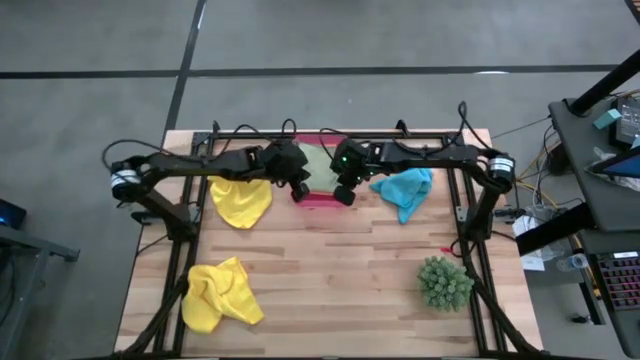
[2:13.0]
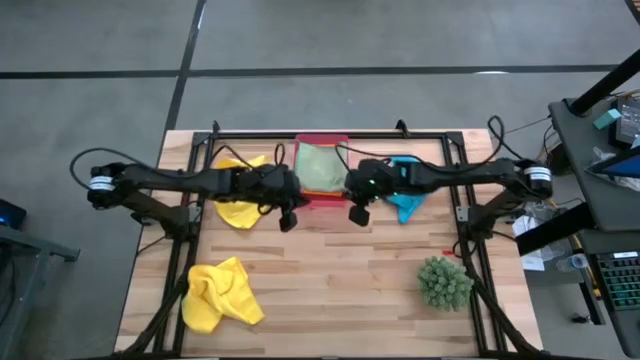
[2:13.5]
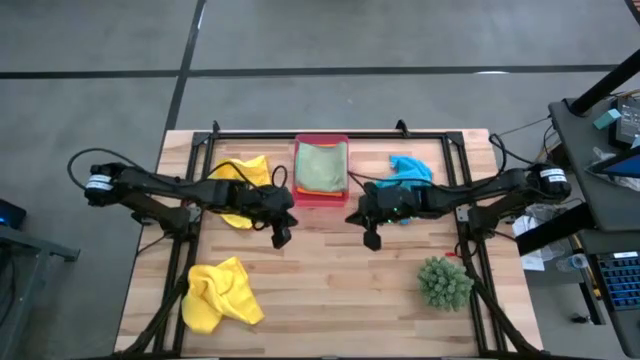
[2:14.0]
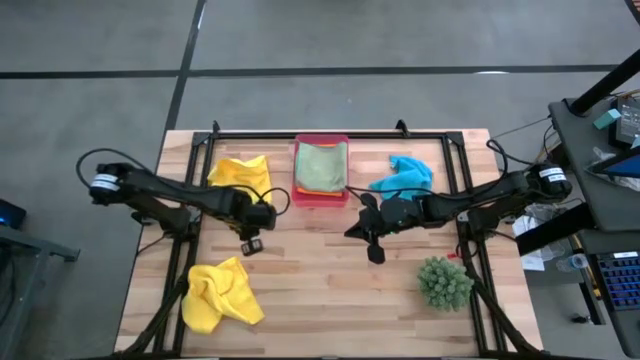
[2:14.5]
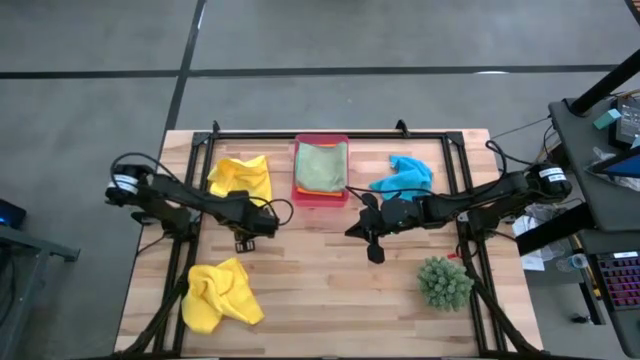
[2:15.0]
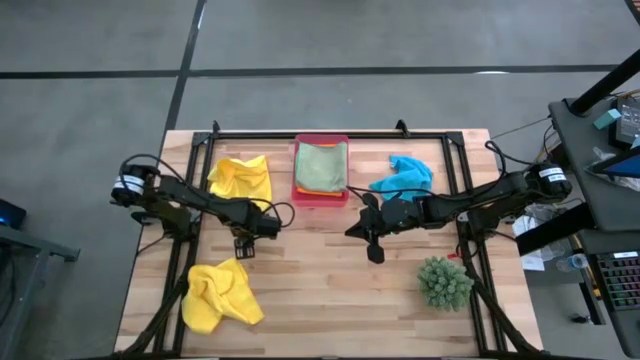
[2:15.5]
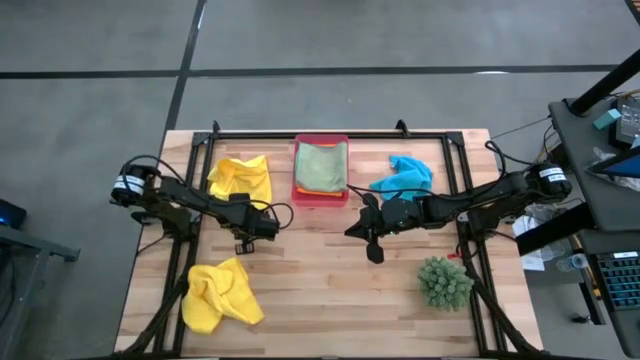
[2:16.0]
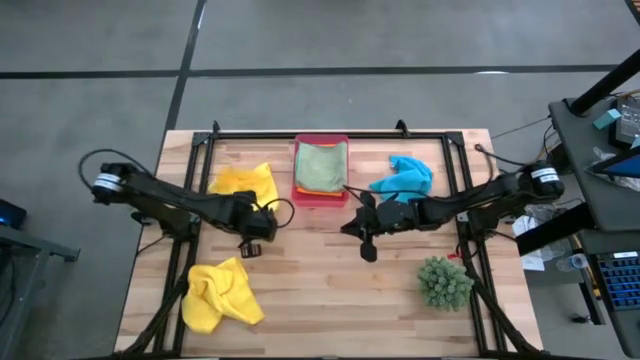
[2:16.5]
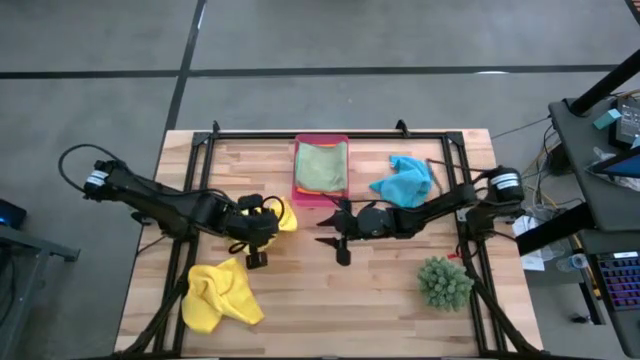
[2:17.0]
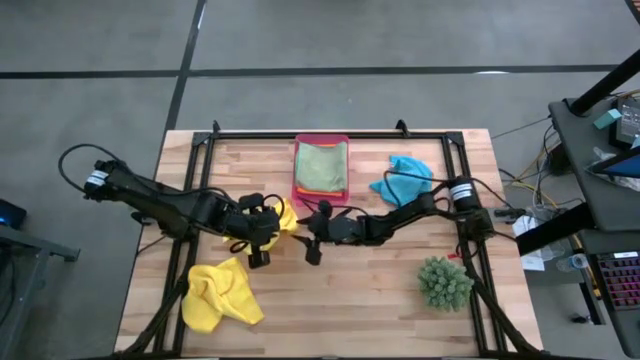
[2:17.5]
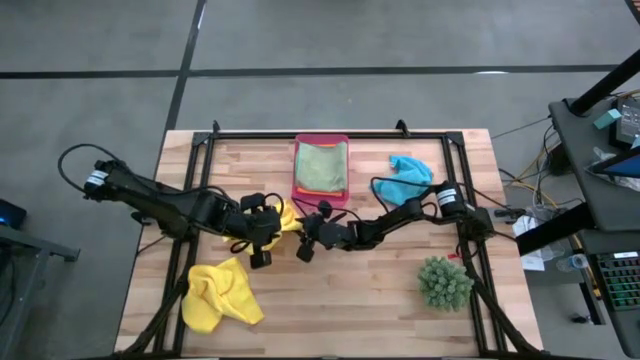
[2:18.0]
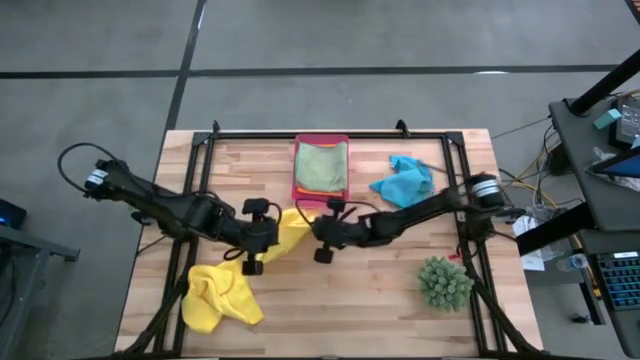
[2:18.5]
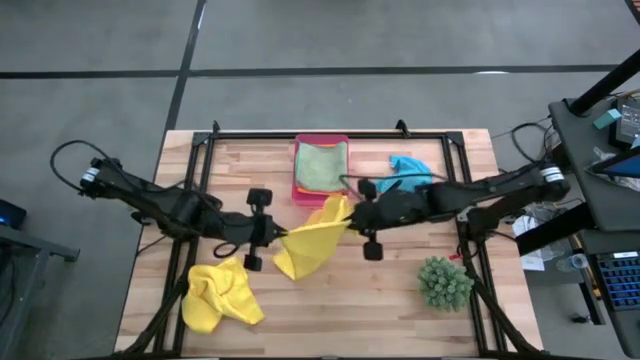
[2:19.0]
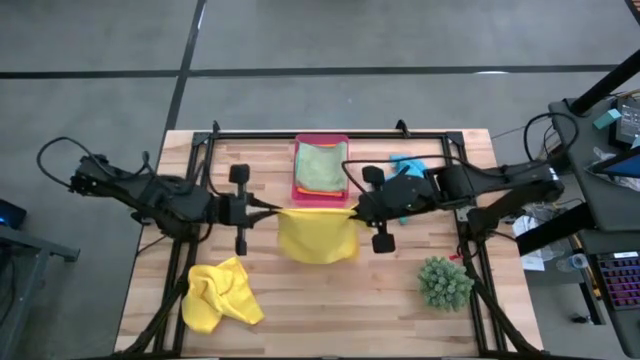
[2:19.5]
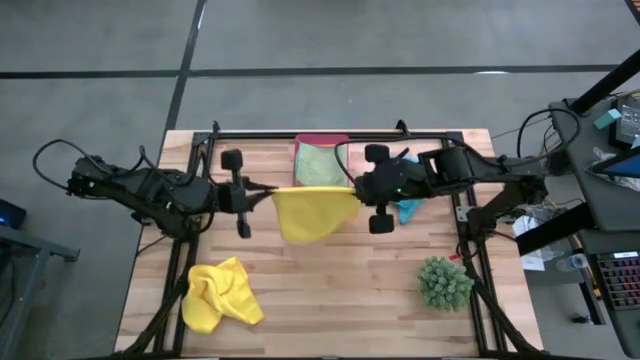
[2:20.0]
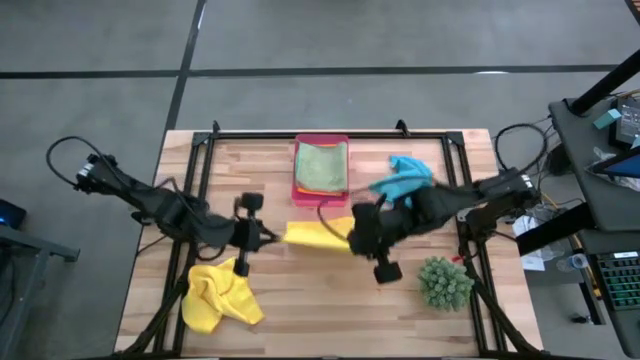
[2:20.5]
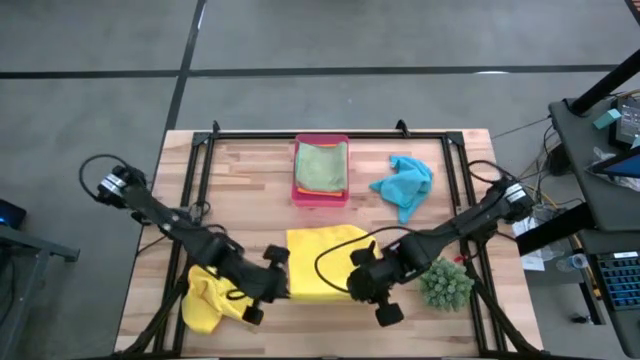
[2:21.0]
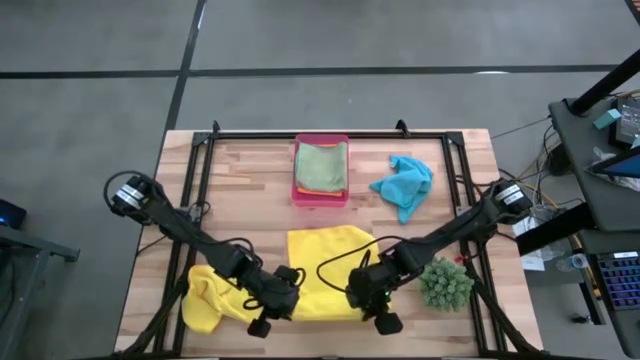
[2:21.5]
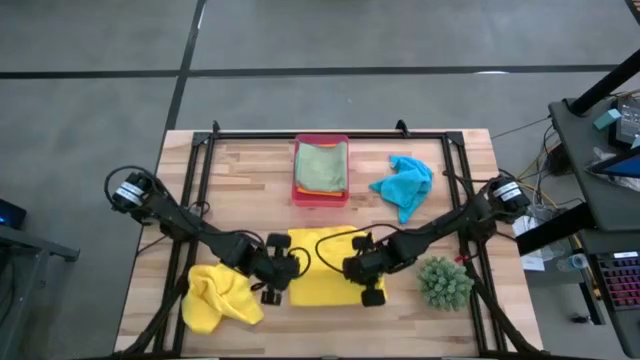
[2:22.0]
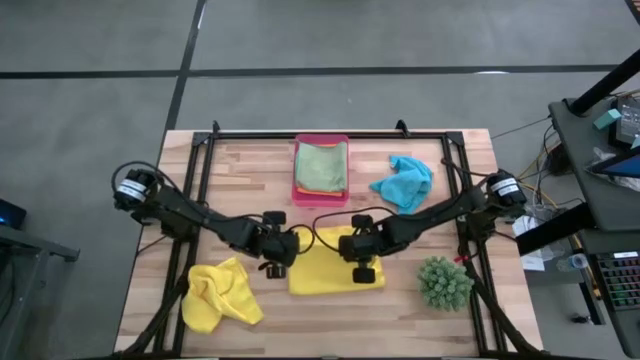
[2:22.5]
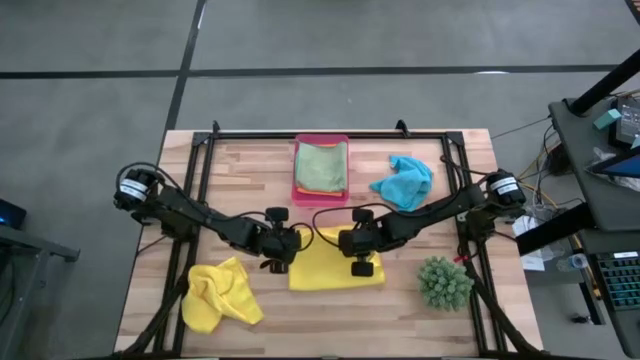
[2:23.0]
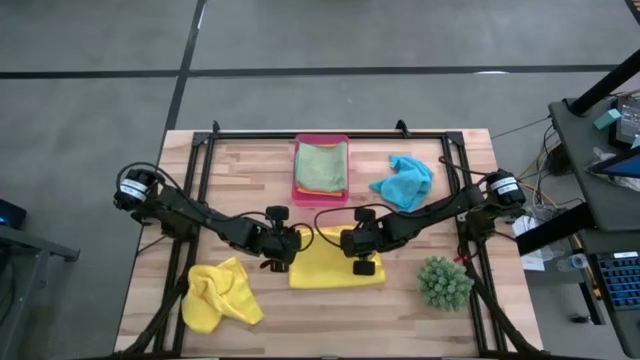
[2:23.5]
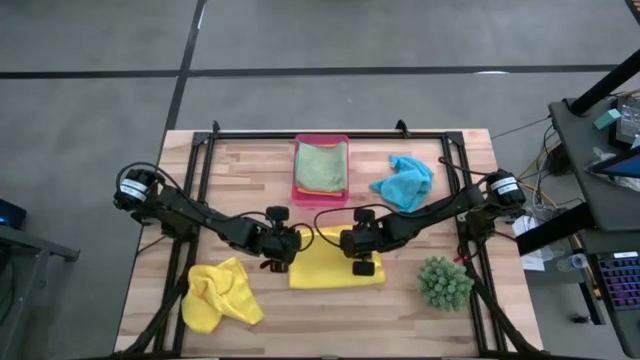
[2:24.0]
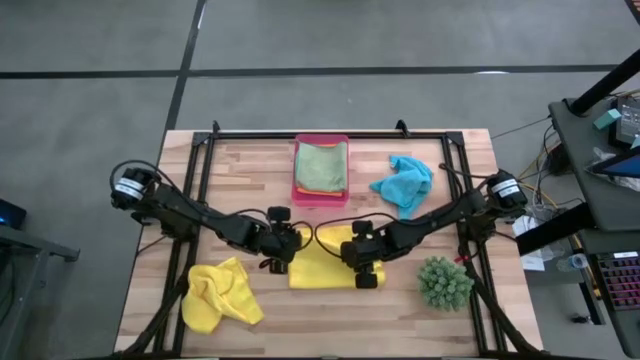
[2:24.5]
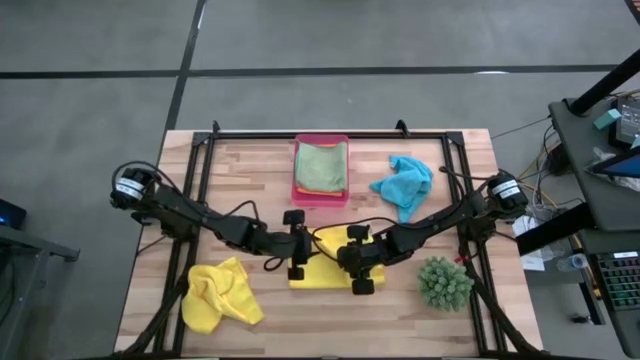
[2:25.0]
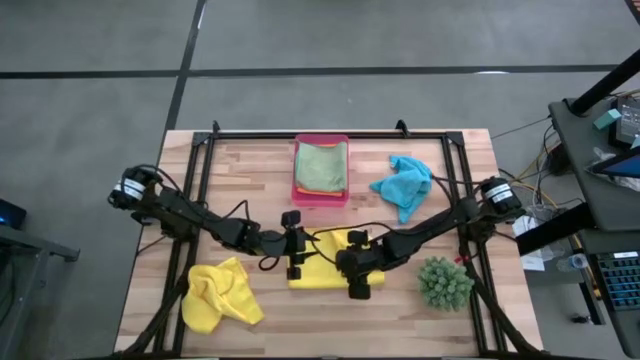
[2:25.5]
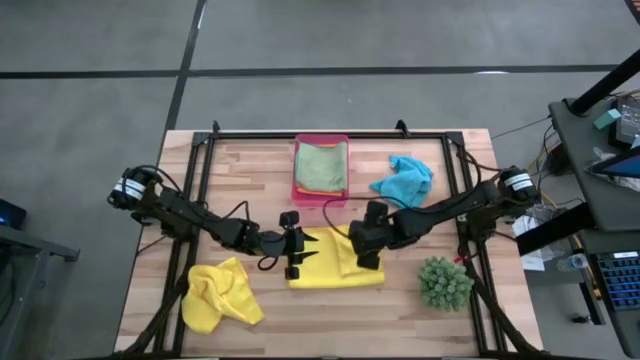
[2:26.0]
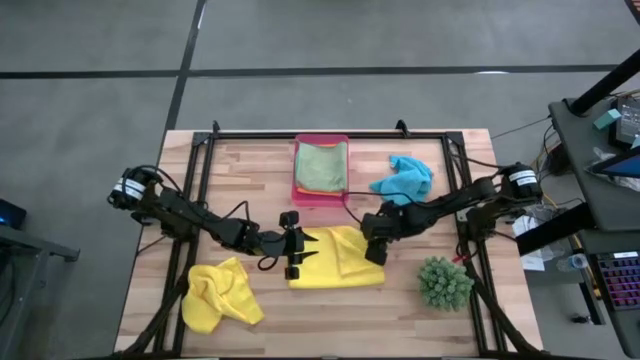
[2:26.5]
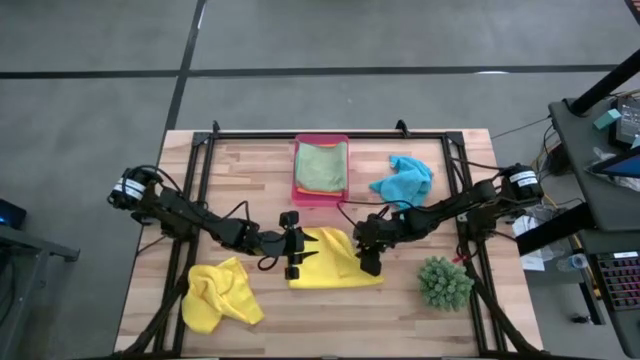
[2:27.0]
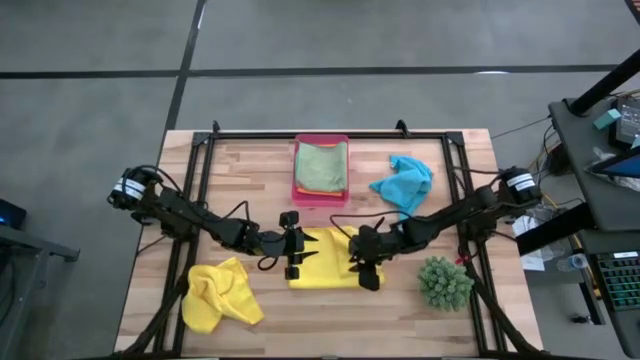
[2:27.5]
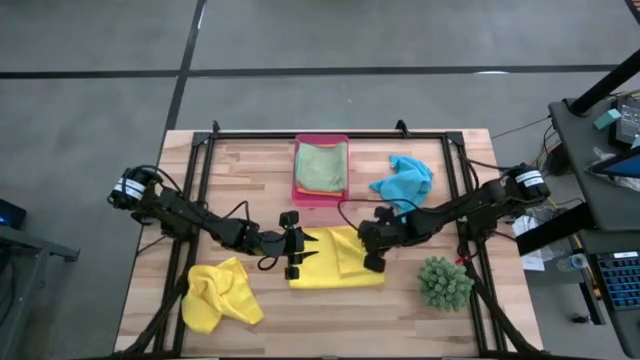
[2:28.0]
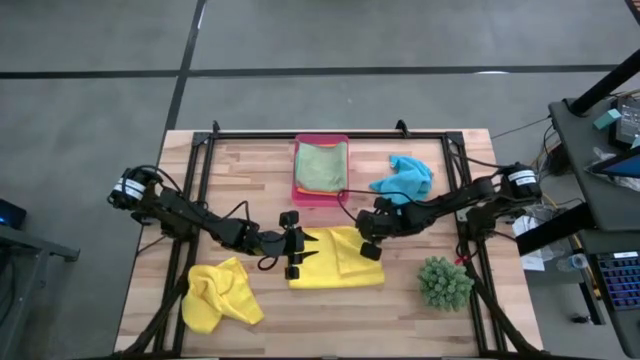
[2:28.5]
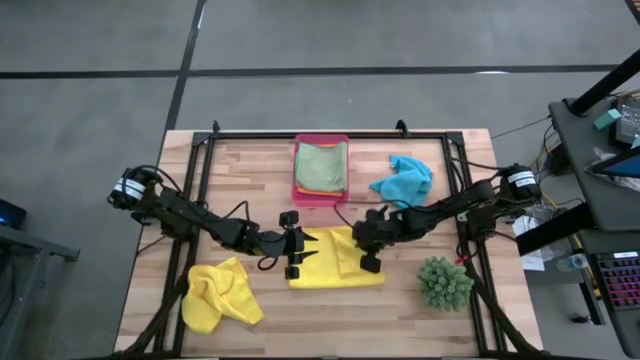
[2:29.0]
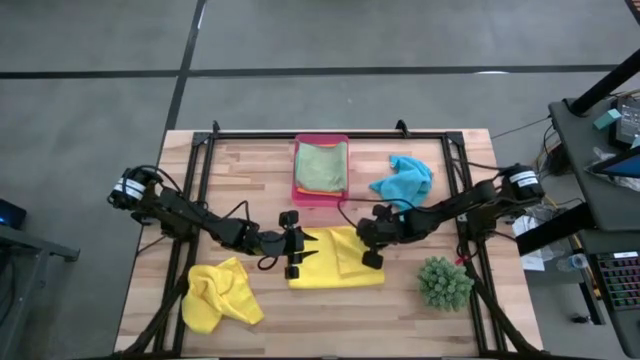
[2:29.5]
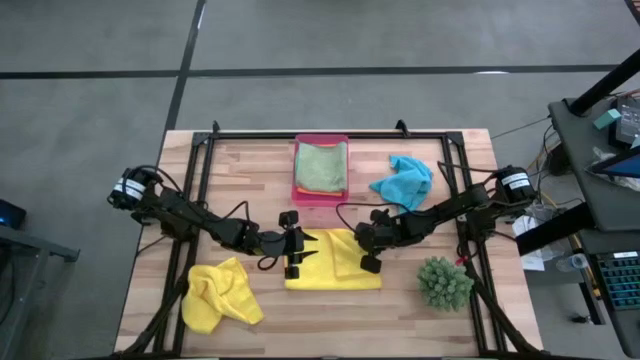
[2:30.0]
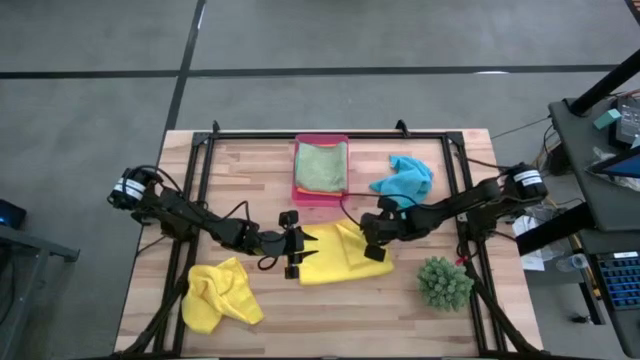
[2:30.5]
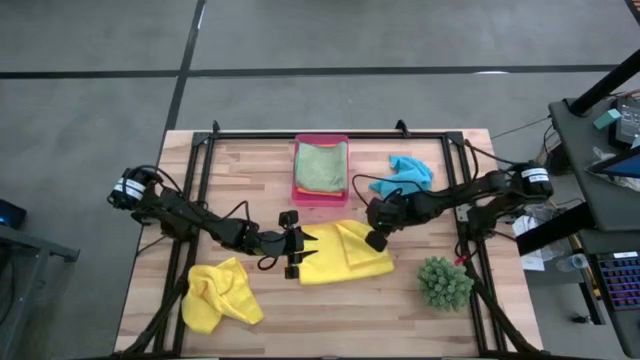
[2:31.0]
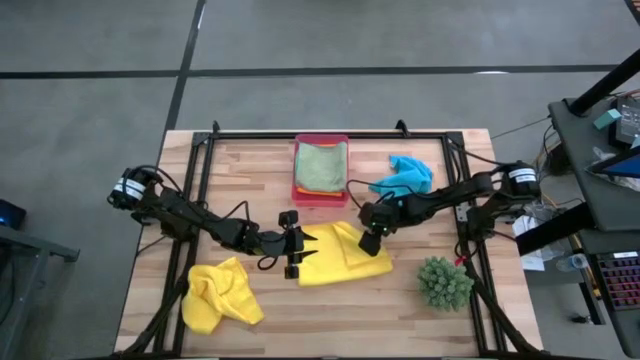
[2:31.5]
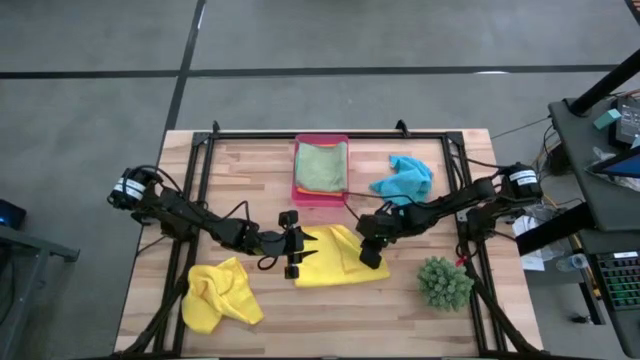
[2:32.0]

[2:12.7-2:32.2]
Task: Fold microfiber towels
Fold the top yellow towel
